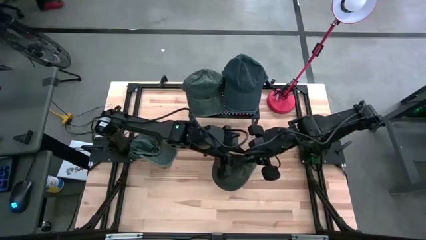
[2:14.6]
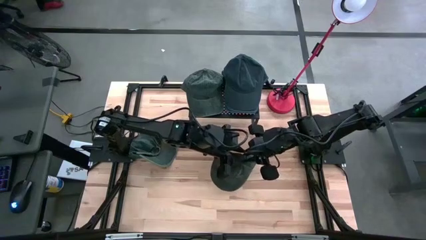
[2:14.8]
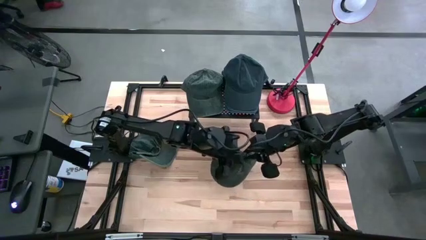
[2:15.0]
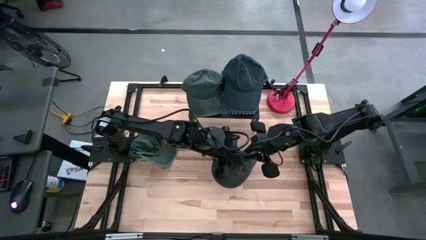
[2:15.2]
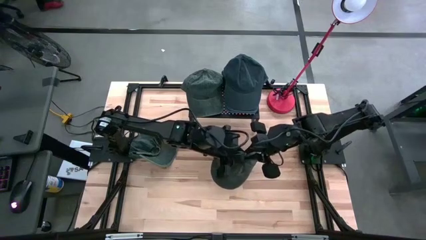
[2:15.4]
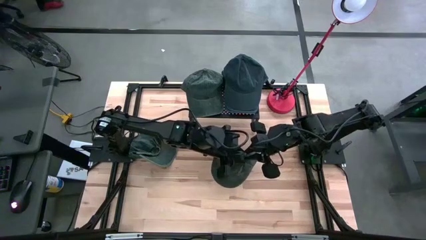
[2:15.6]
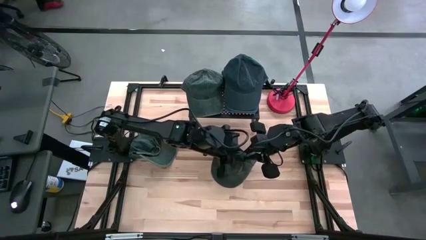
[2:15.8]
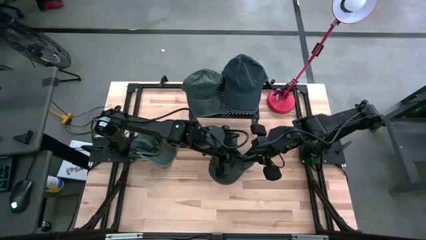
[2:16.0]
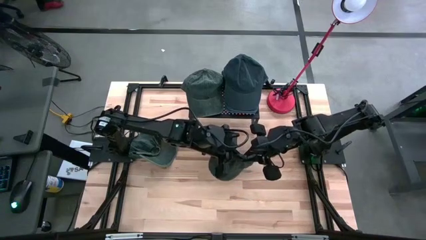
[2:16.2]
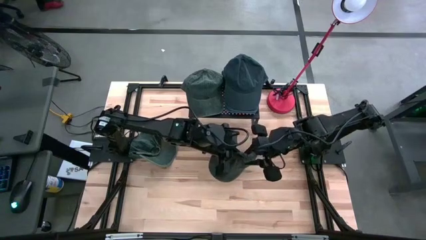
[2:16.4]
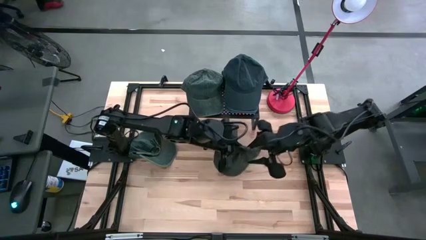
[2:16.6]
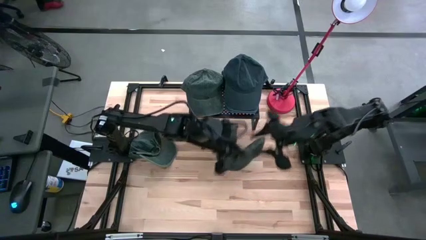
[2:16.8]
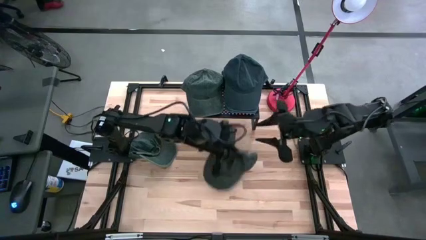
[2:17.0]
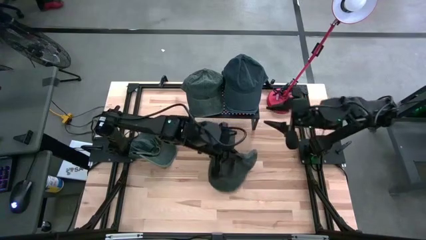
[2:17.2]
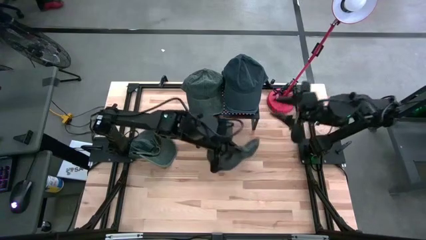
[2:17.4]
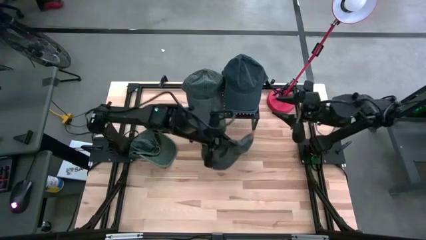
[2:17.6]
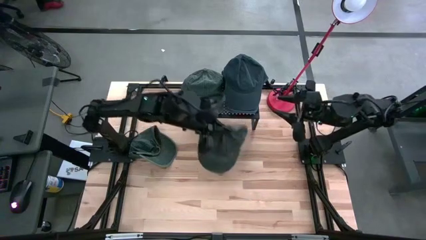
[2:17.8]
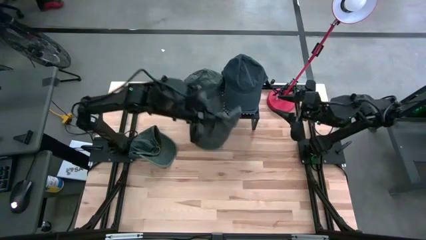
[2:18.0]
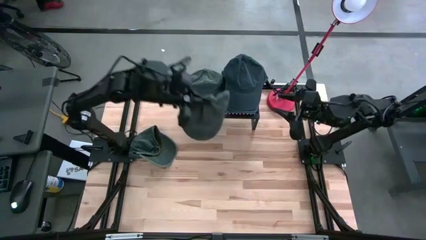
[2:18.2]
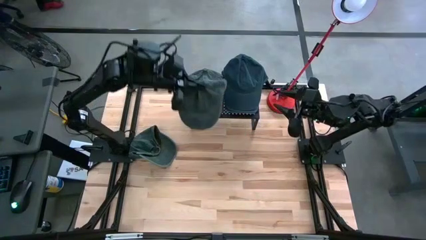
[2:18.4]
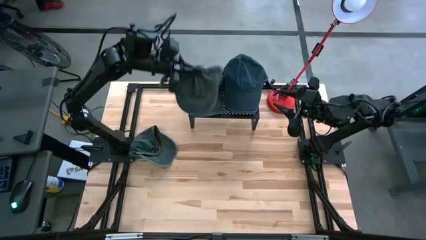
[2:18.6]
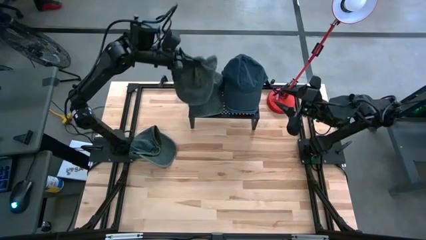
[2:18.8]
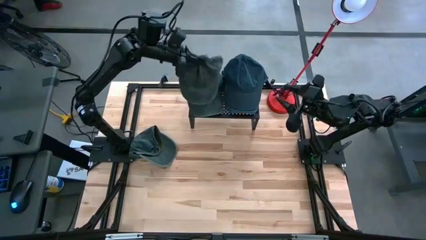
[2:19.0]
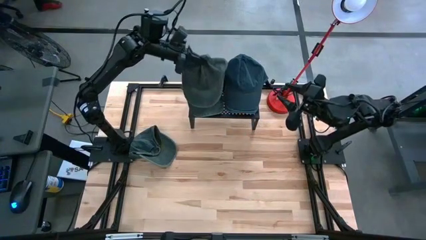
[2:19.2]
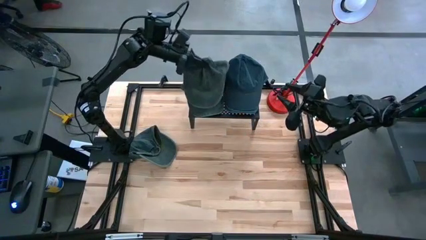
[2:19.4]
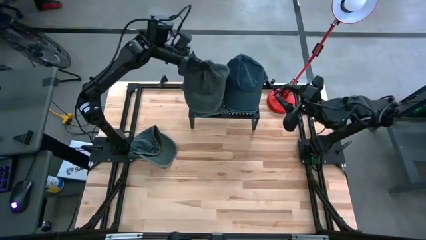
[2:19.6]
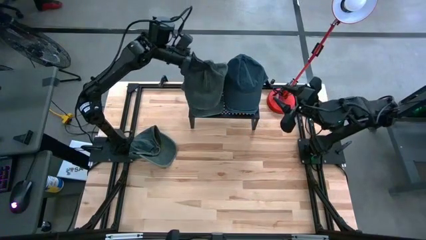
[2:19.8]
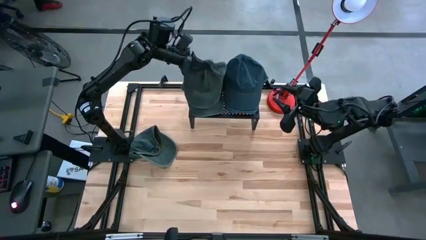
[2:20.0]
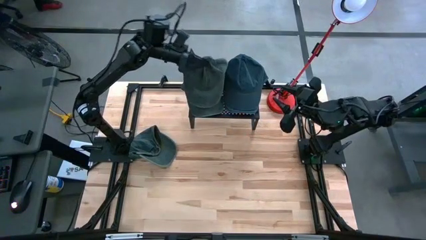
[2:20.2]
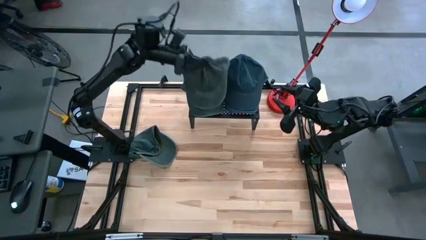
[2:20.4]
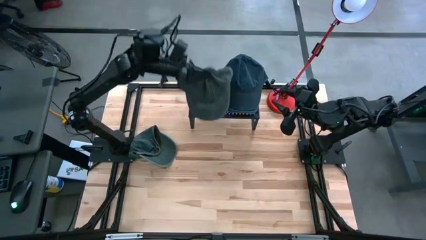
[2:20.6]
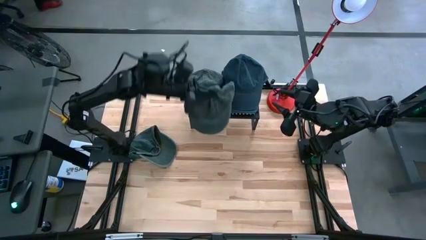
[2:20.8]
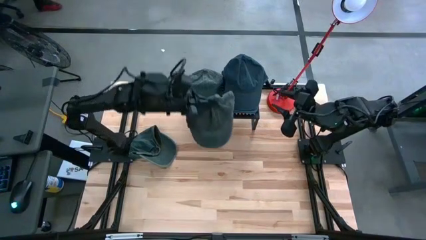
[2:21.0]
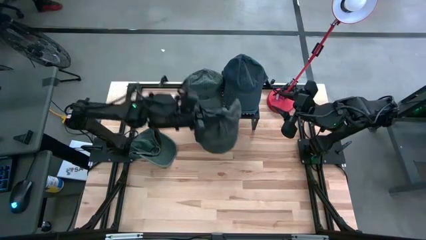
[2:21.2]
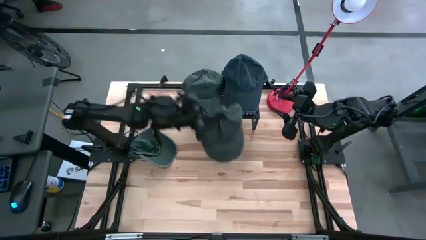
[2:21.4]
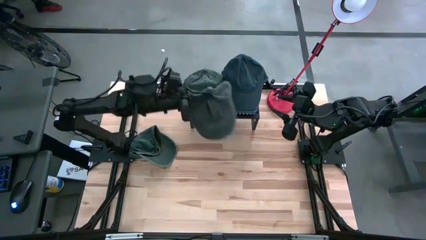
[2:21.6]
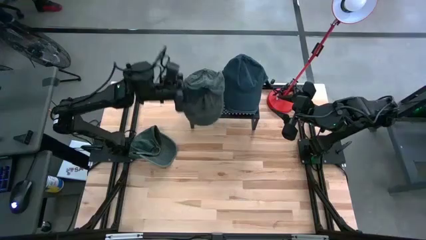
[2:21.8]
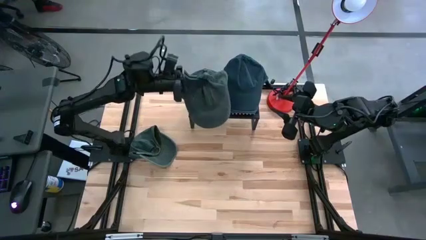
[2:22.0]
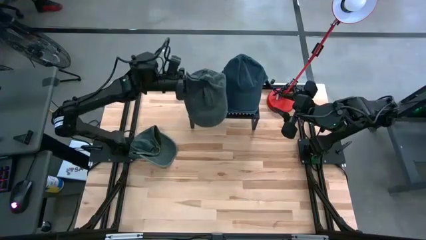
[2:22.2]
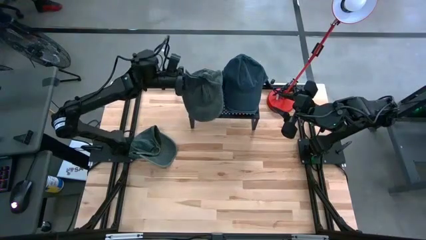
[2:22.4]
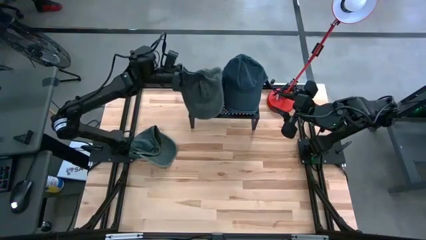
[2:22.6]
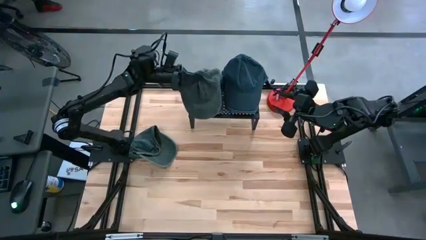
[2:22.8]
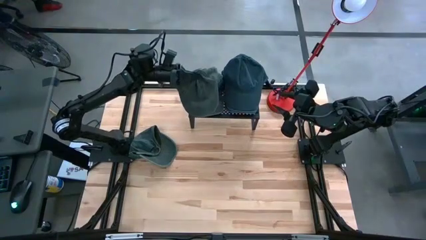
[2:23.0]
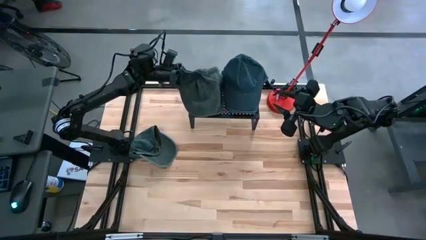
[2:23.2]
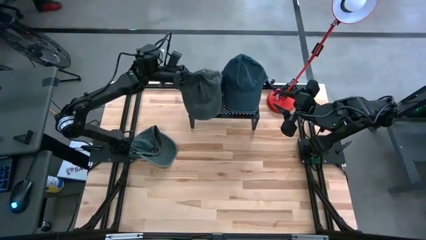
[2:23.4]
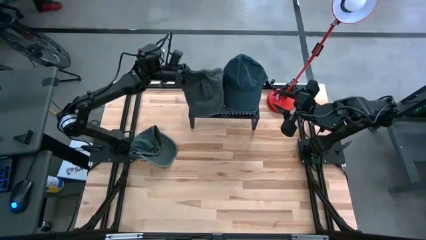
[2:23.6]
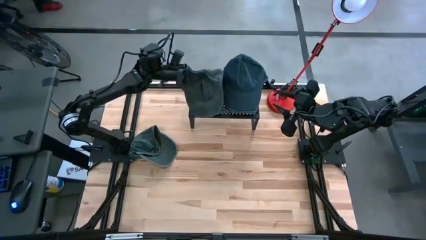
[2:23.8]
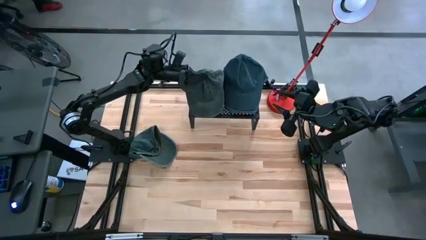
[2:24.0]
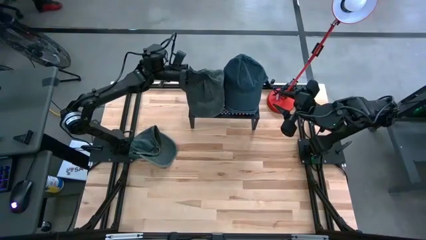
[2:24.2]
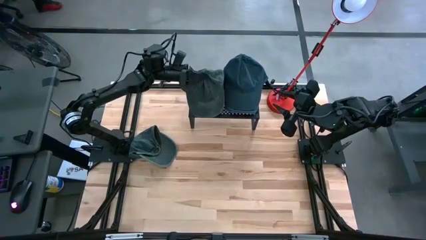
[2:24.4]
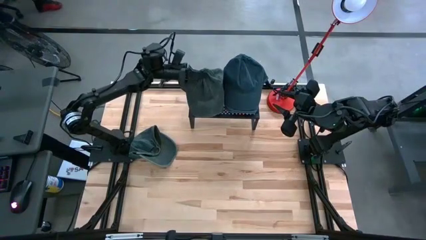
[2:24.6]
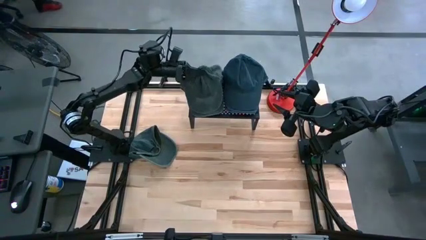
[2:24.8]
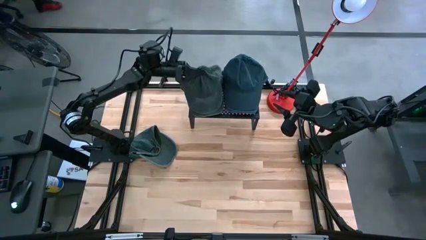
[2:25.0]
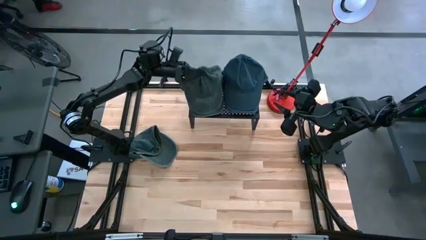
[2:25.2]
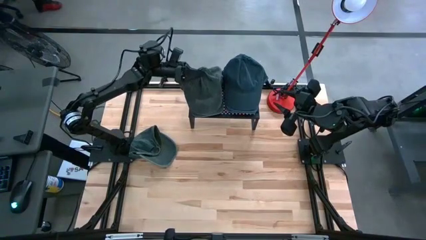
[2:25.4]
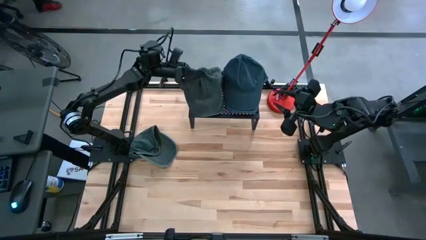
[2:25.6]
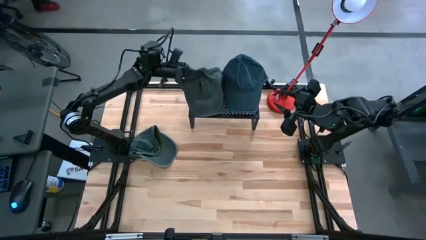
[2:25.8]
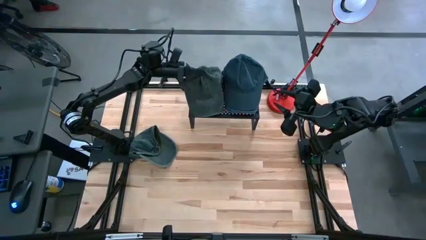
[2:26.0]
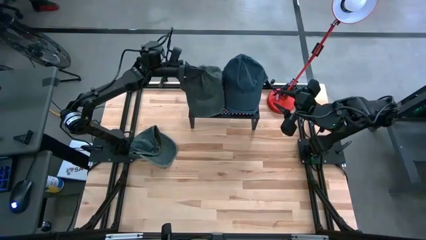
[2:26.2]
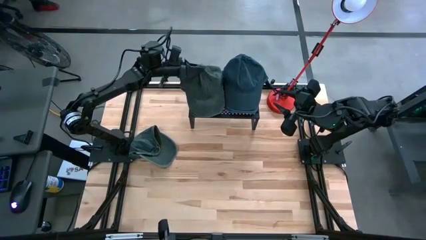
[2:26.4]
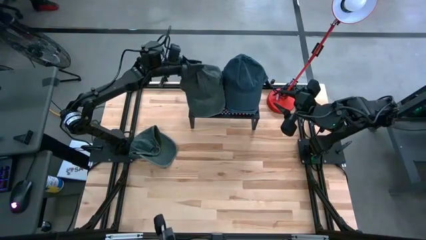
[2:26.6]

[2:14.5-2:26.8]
Task: Pick & Place hat
Stack the right dark green cap on top of the other dark green cap on the shelf

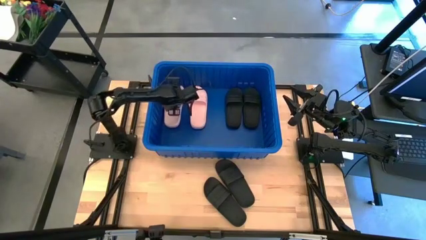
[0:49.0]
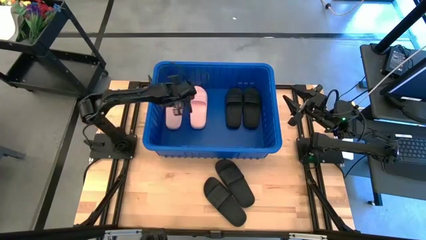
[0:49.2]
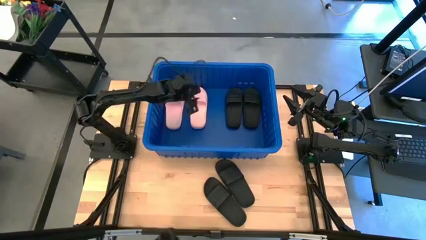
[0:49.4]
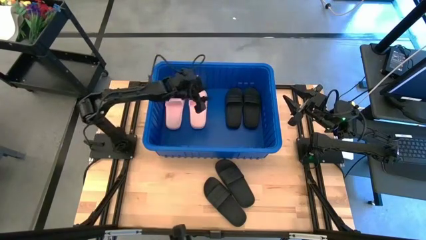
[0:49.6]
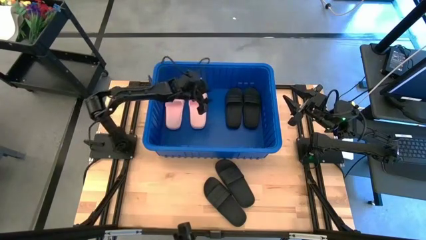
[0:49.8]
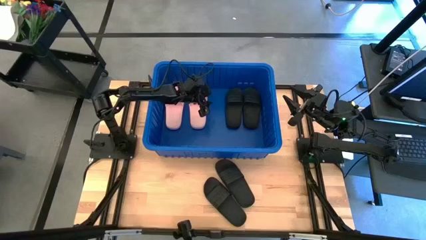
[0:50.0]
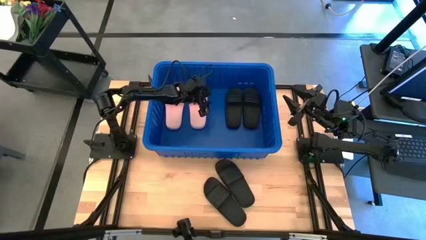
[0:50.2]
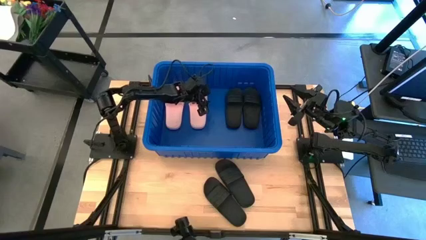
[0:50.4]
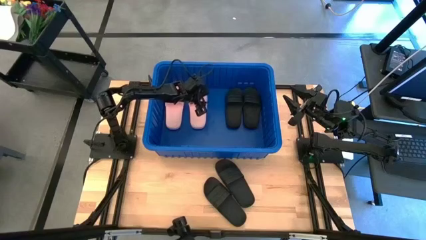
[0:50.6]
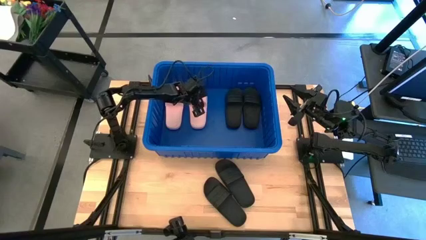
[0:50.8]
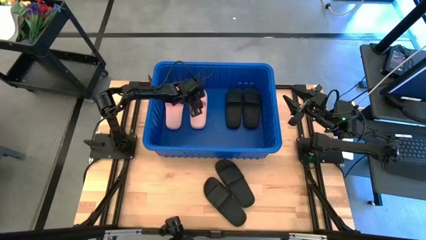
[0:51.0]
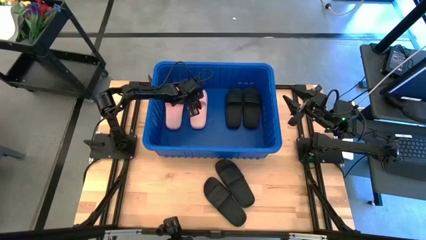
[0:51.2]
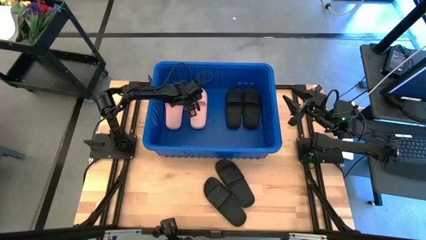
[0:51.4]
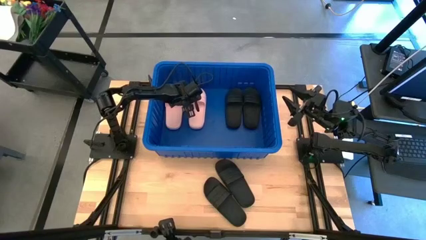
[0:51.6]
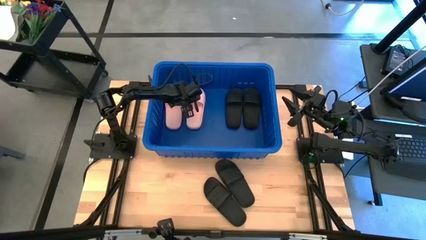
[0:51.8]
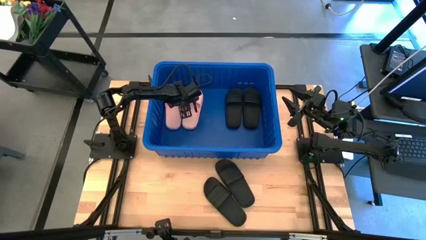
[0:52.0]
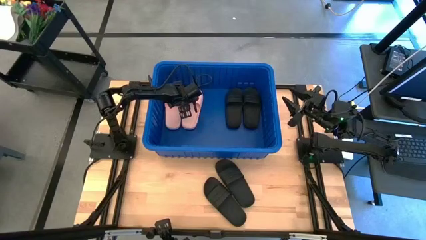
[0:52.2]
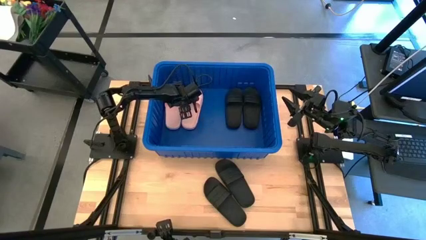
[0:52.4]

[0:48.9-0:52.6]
Task: Pick and place slides into bin
Adjust the right pink slide in the blue container
